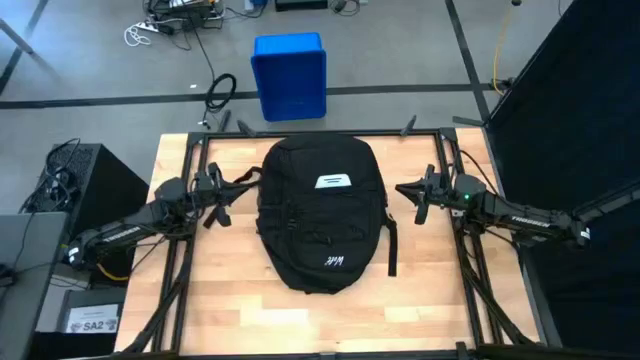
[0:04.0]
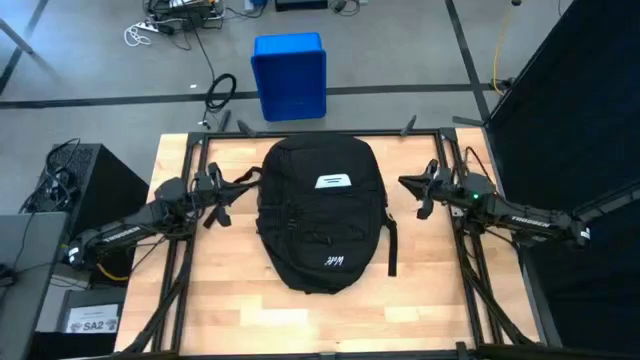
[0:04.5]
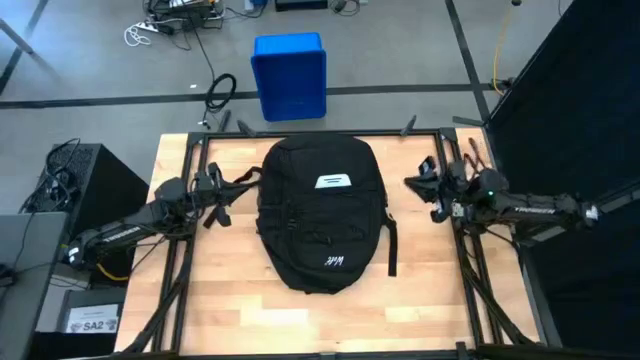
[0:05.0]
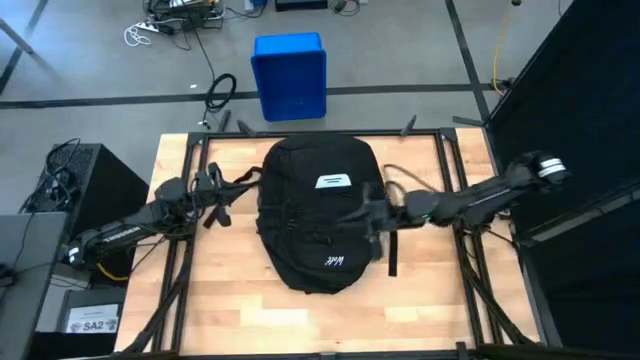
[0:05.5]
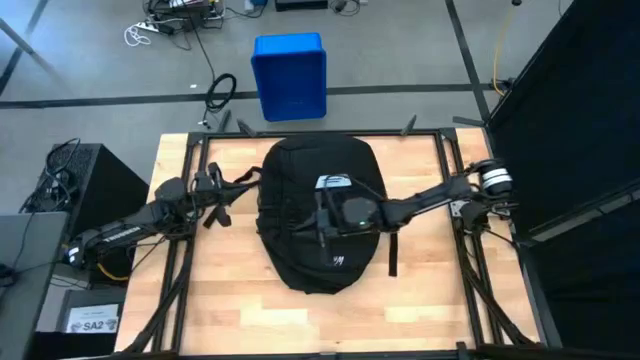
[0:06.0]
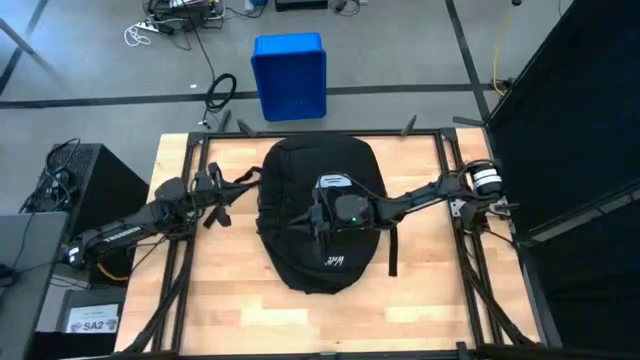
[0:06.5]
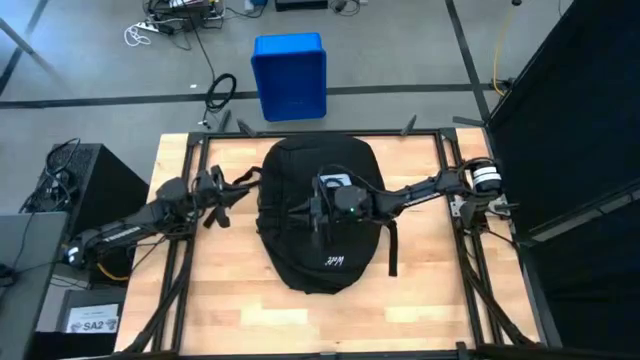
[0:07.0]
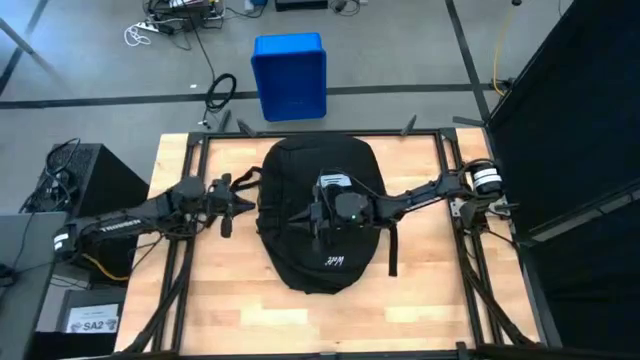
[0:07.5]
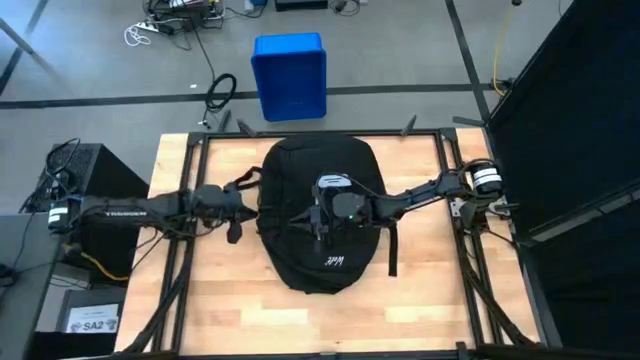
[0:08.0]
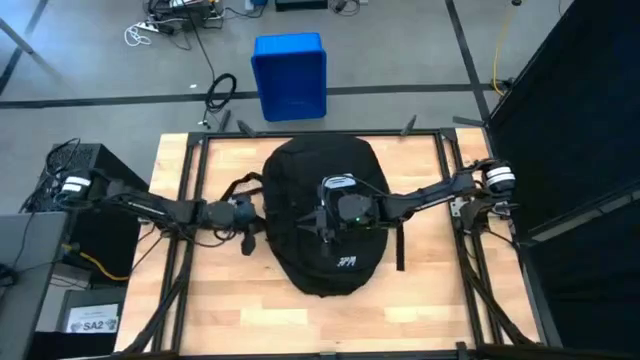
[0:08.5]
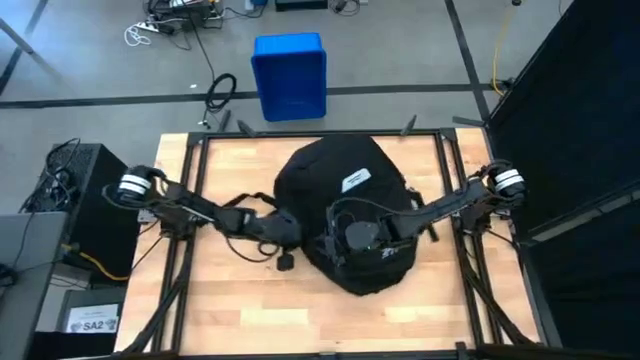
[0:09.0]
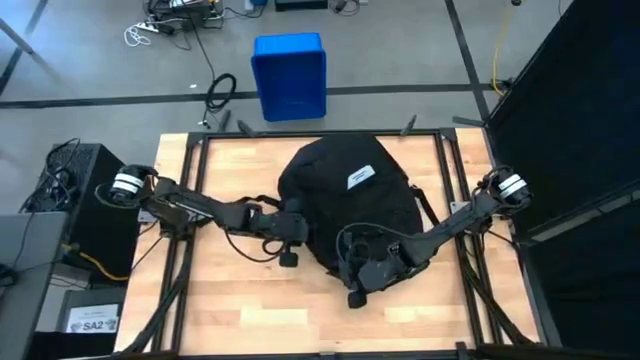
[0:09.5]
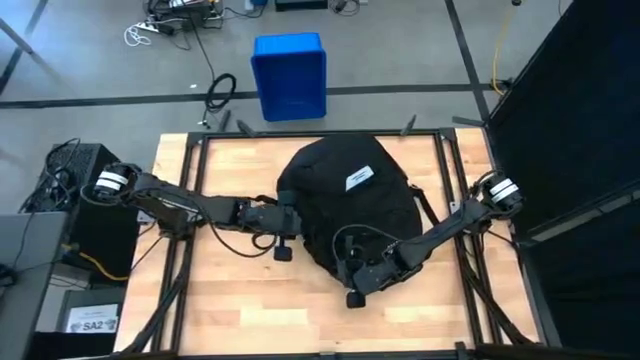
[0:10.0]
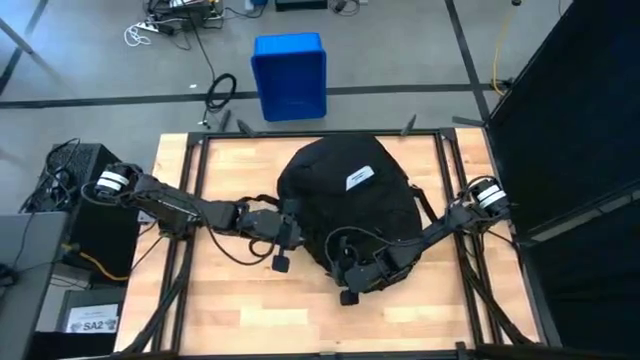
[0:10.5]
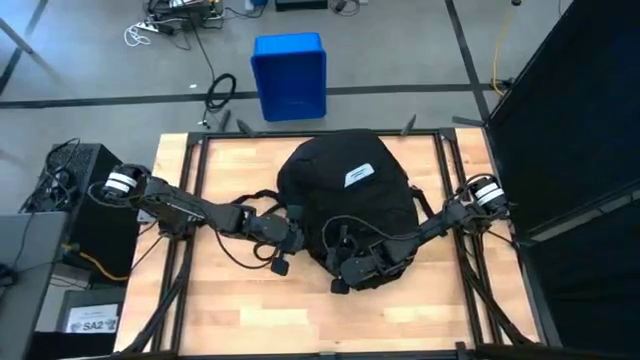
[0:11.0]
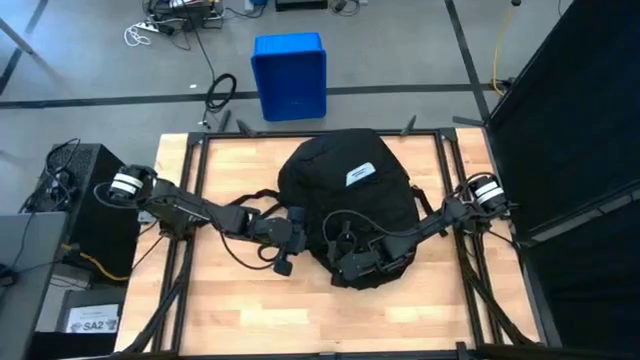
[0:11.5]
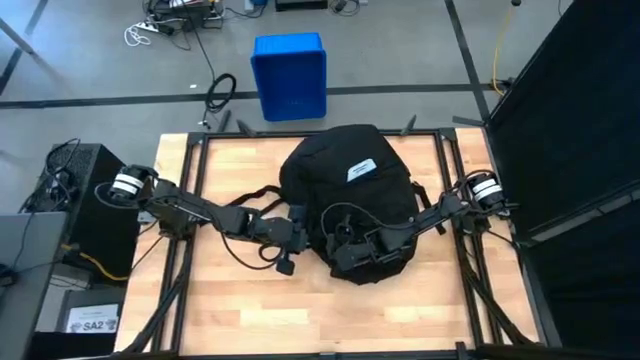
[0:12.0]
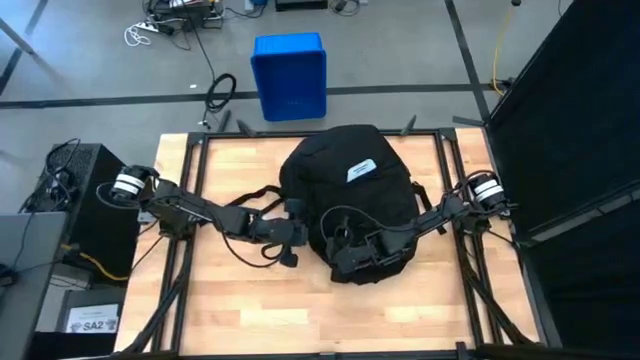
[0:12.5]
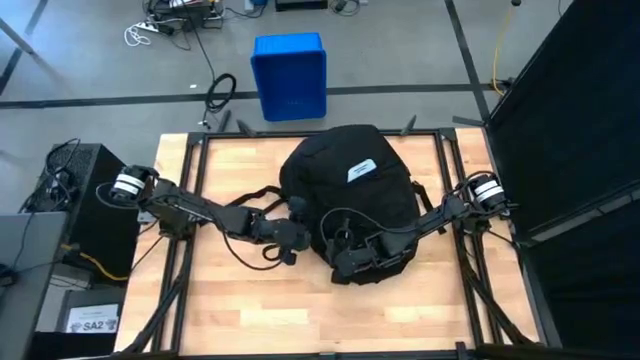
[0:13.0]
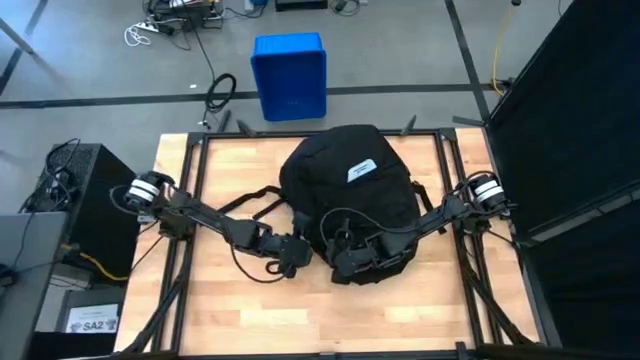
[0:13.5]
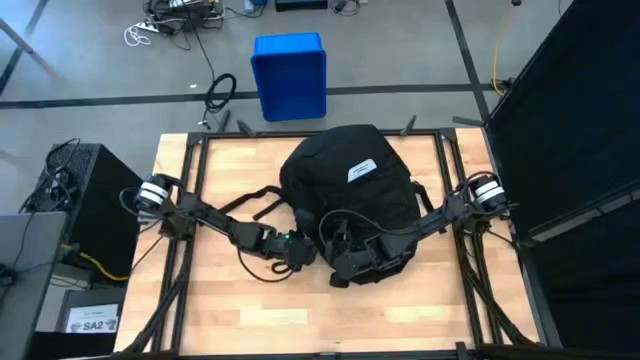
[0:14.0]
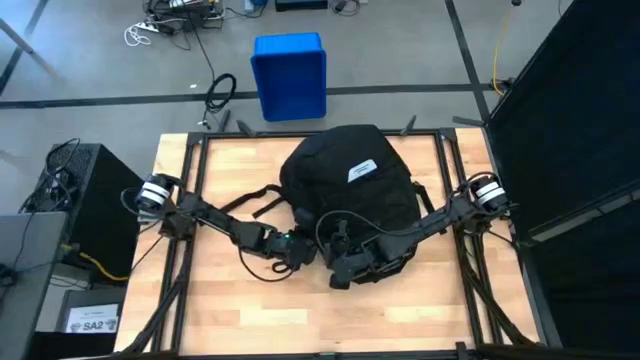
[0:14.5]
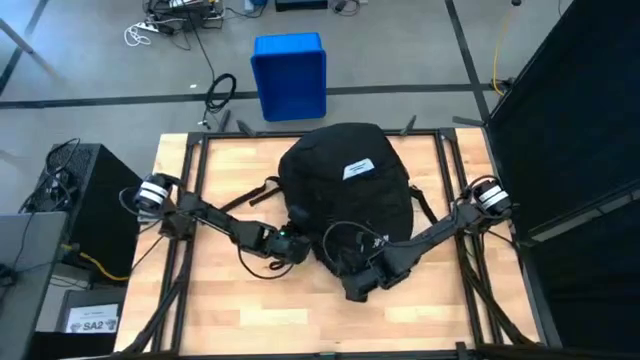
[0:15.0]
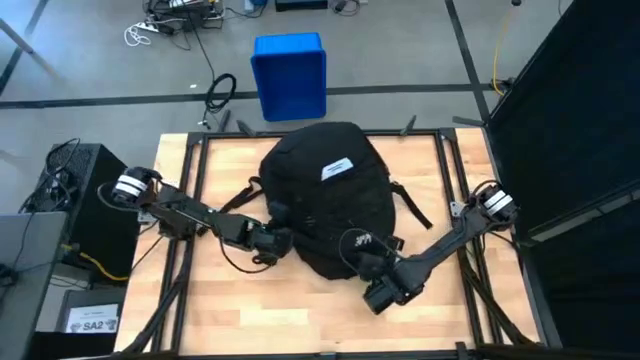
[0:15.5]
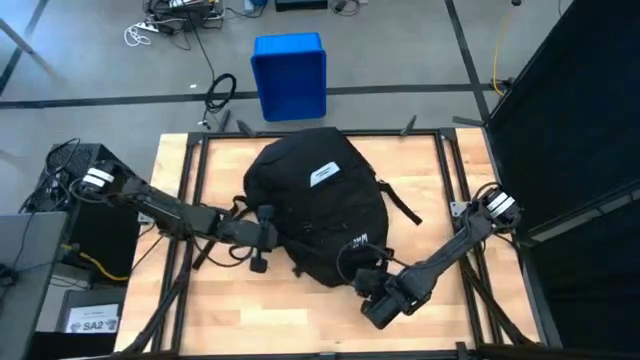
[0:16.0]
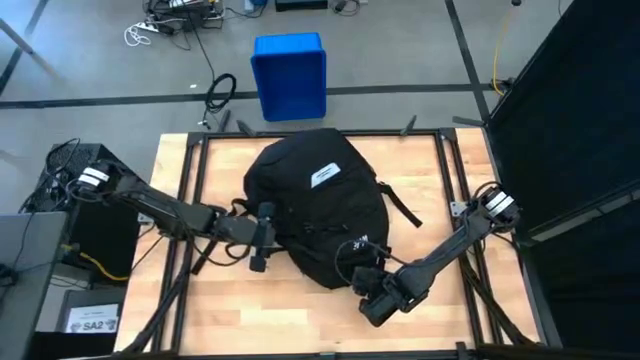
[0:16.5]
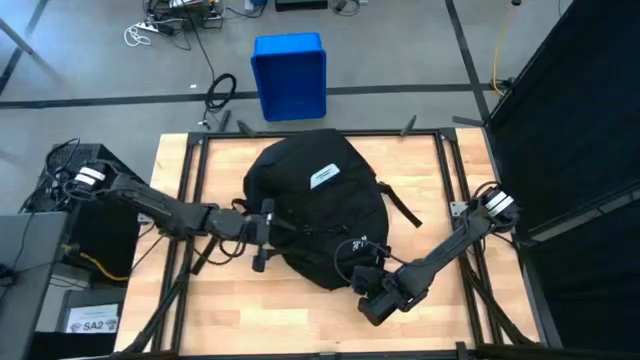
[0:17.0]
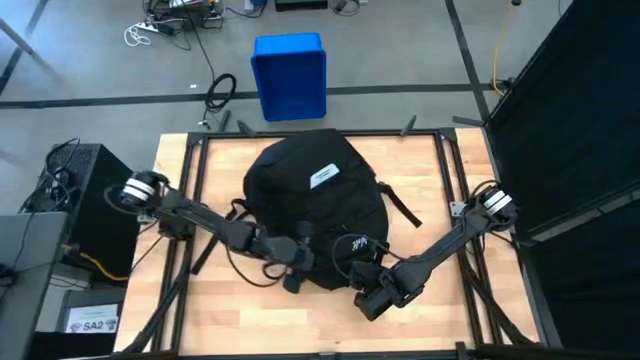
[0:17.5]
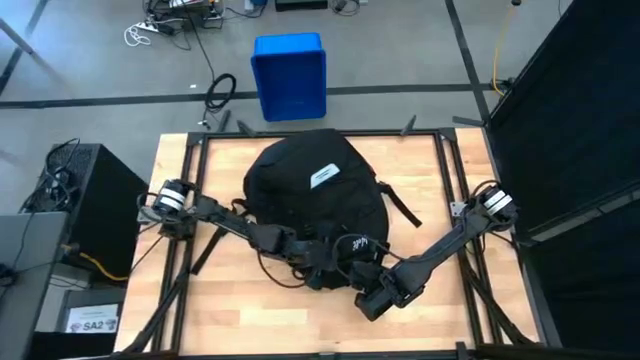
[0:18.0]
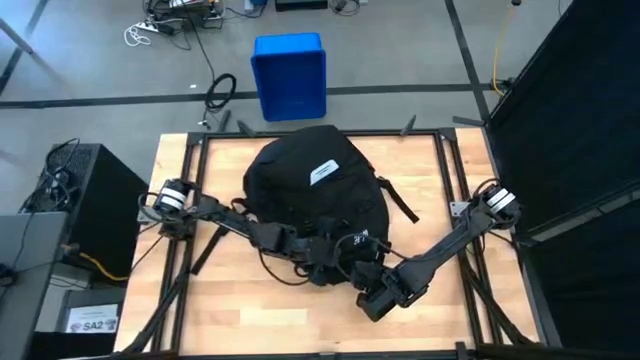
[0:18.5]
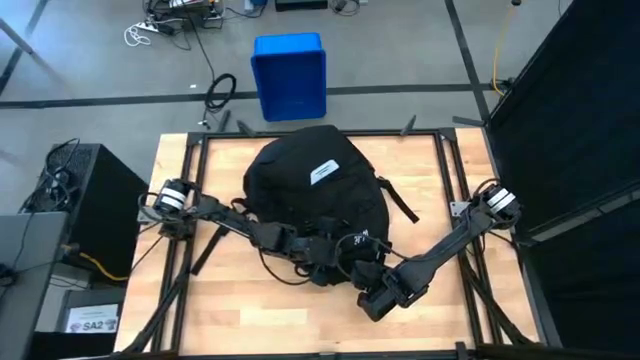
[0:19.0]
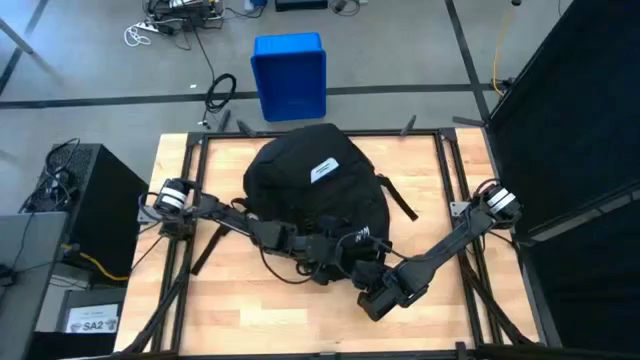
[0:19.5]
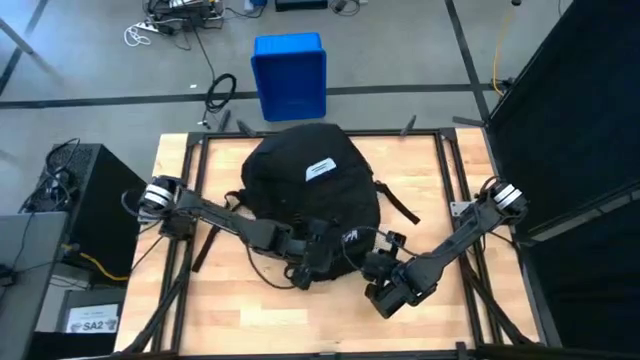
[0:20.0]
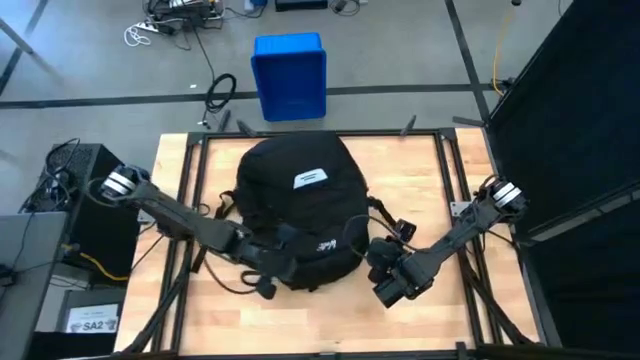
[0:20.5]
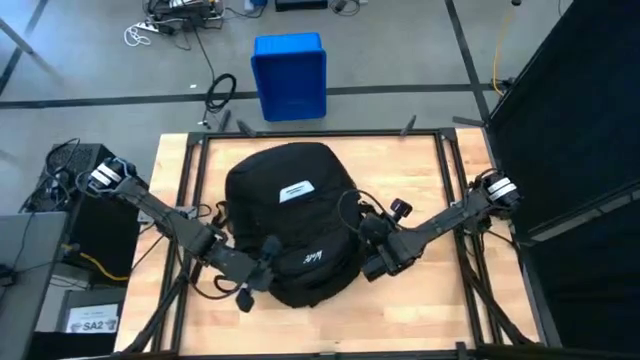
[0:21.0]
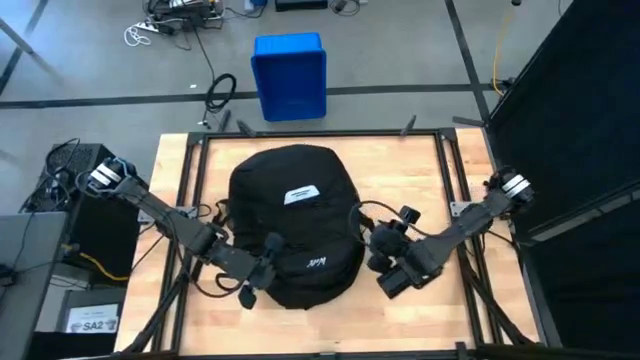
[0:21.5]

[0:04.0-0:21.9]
Task: Unpack backpack
Open the backpack

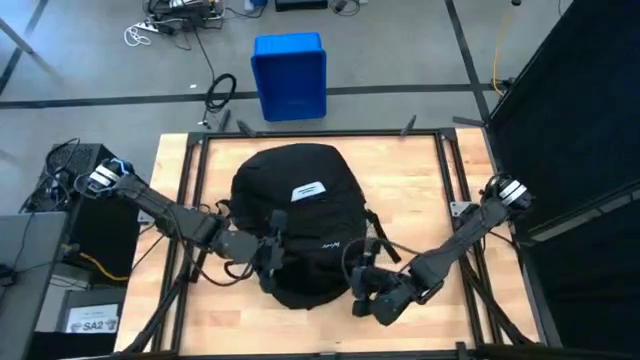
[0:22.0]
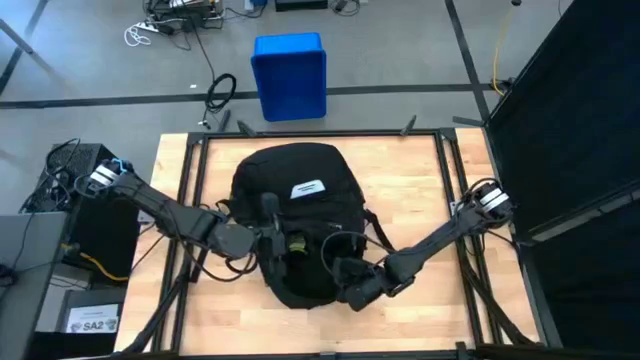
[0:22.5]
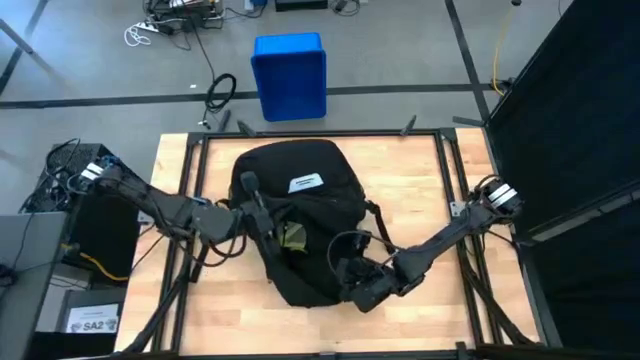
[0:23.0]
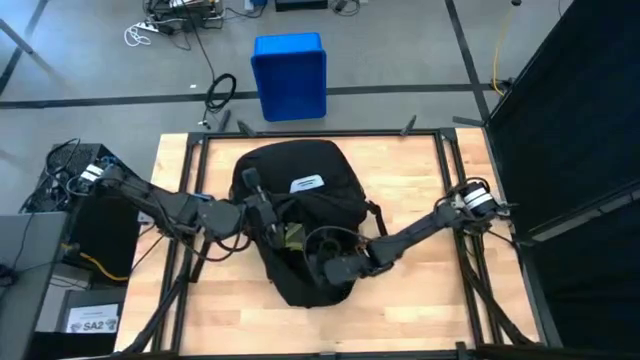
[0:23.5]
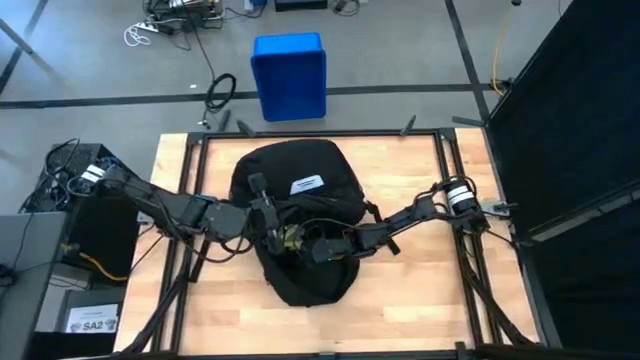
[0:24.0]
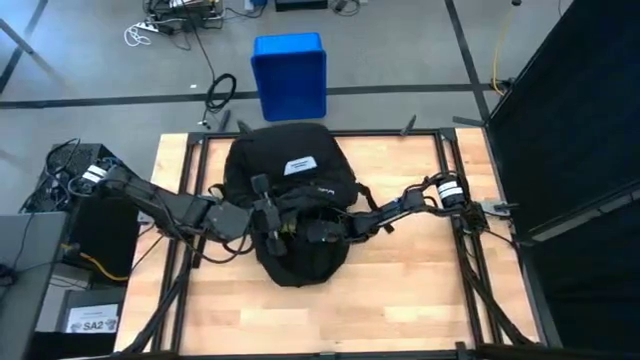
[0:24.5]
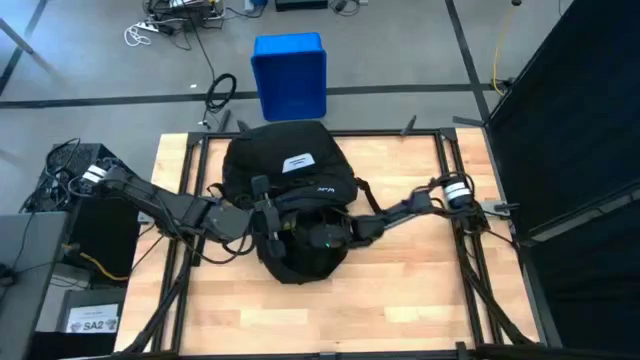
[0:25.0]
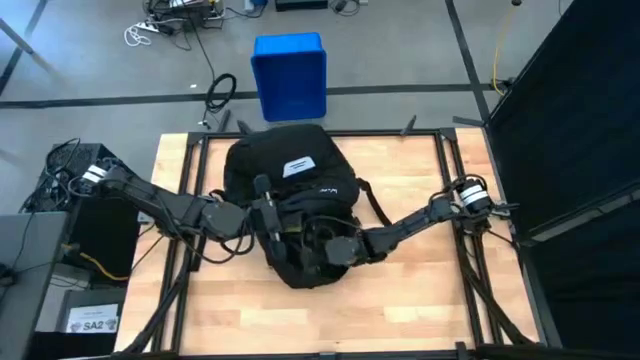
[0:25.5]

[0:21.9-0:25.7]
Remove the zip bag from the backpack
